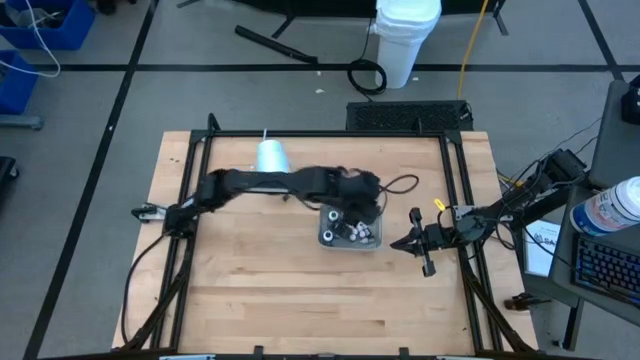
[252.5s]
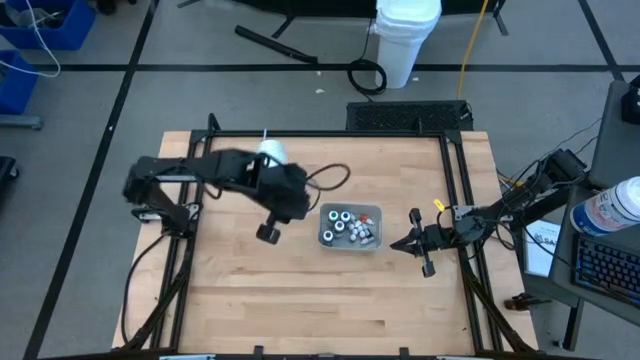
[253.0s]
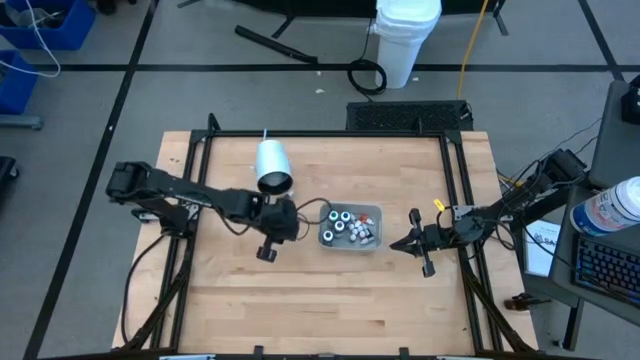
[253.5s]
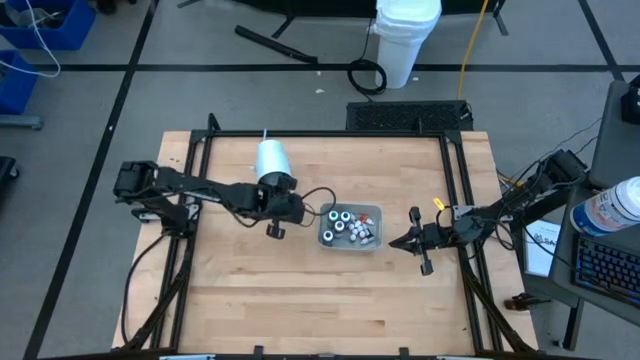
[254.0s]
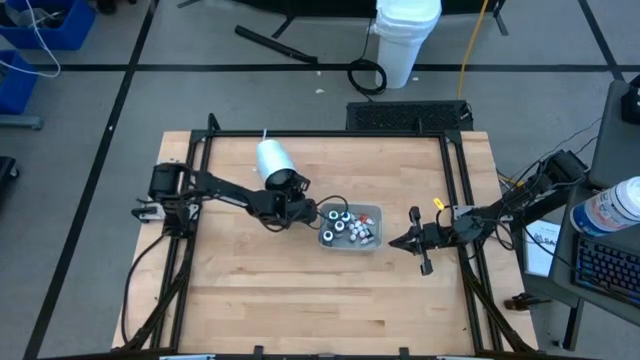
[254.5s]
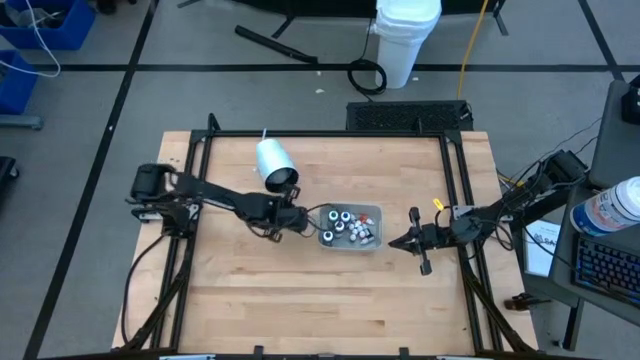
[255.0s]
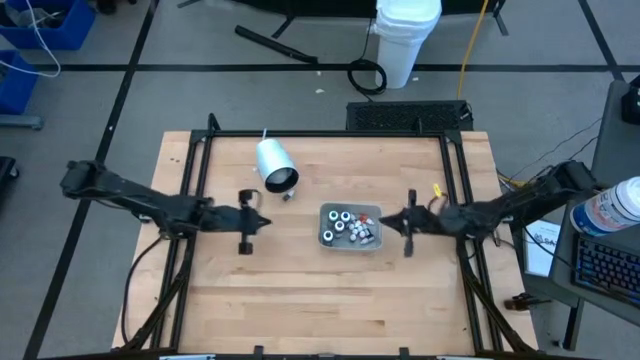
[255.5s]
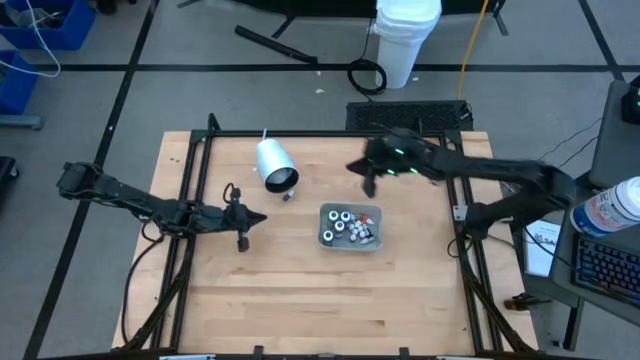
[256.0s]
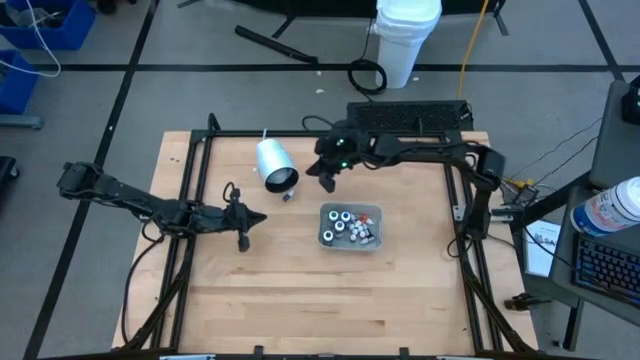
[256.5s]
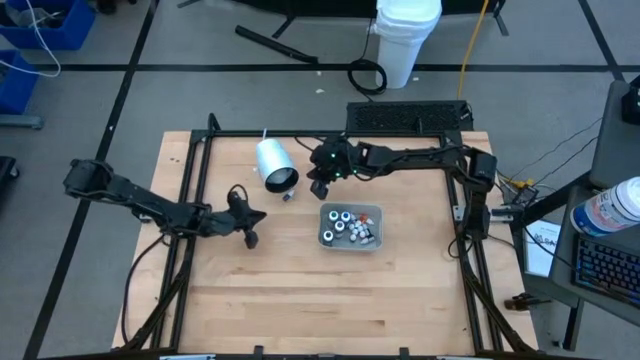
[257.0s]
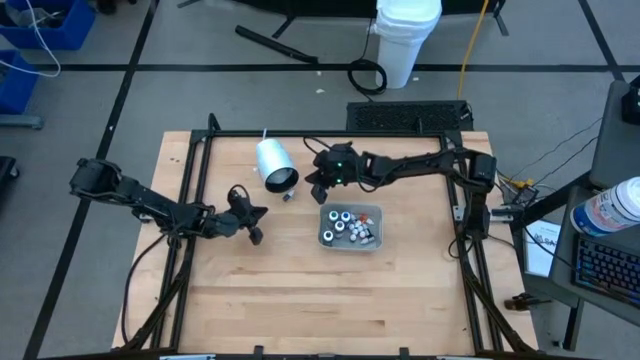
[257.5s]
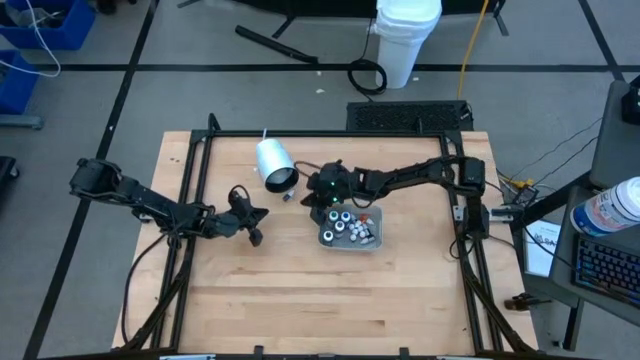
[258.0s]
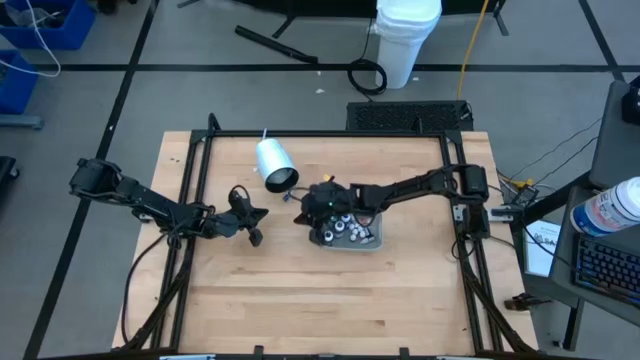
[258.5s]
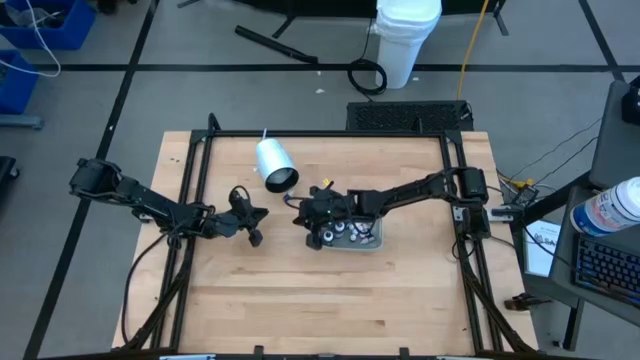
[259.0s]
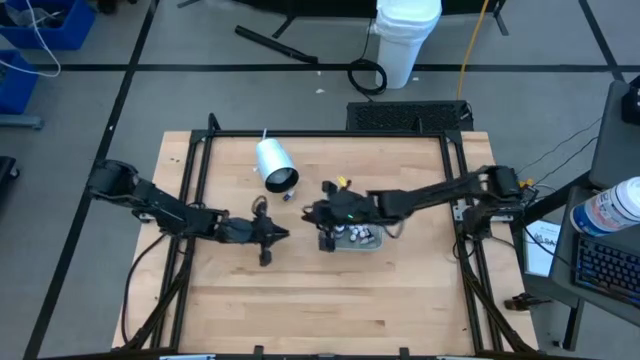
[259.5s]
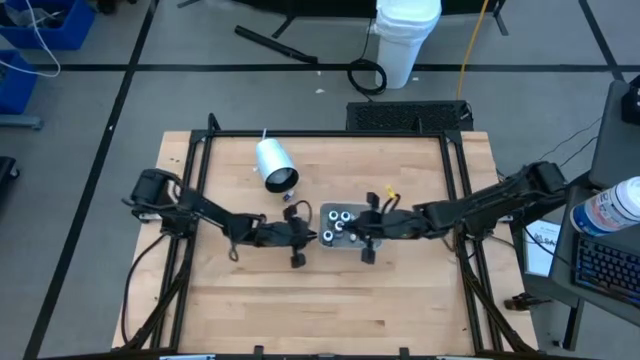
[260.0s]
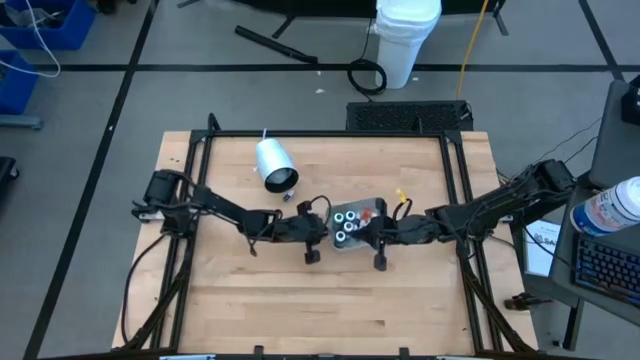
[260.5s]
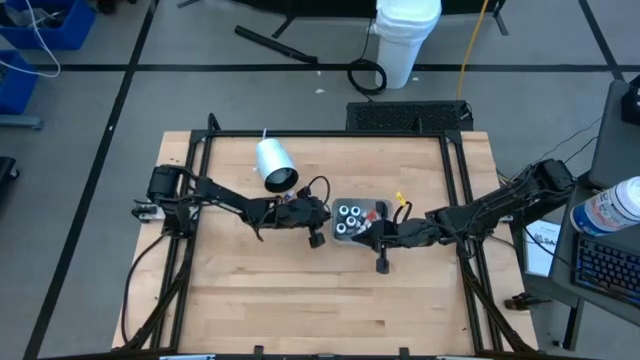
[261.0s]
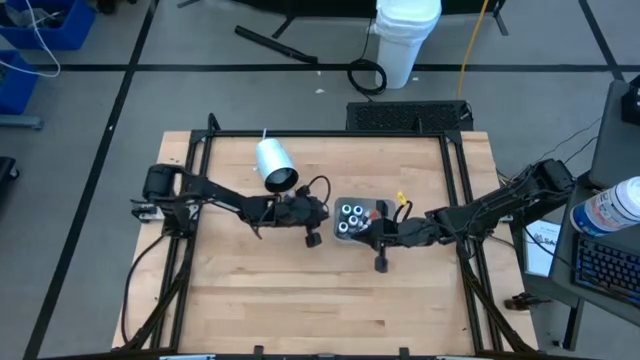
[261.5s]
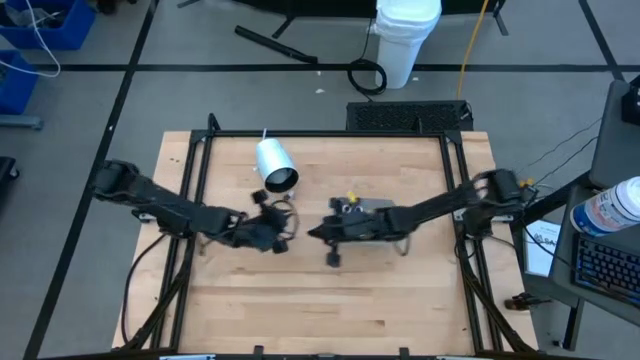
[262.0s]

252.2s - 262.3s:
Task: Pick & Place food coloring
Adjust the white bin

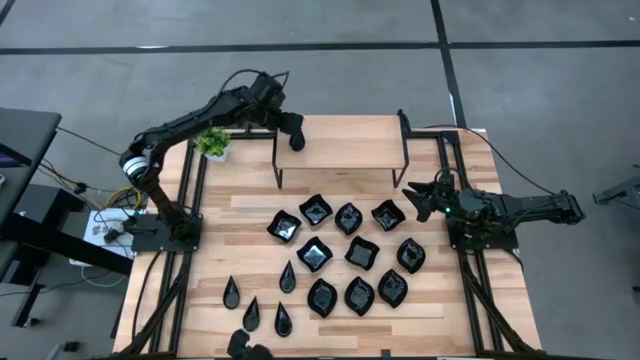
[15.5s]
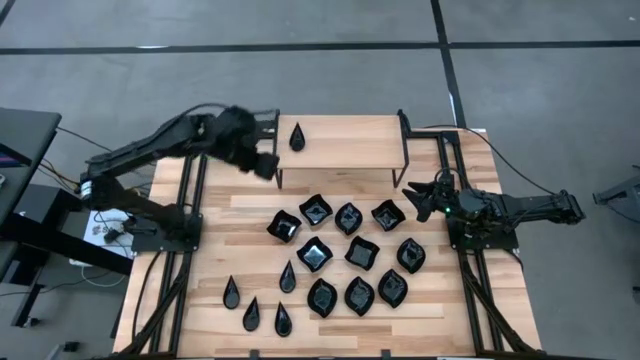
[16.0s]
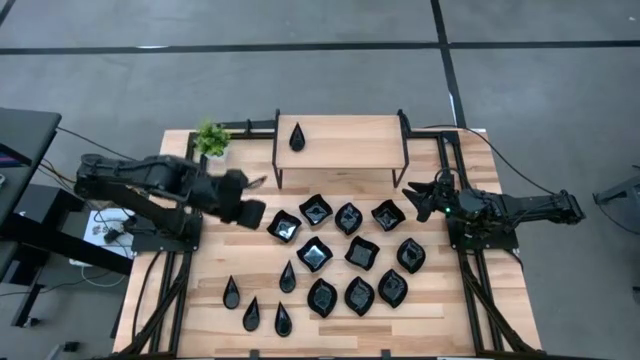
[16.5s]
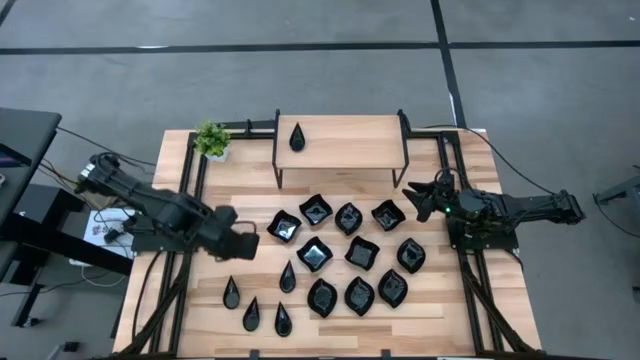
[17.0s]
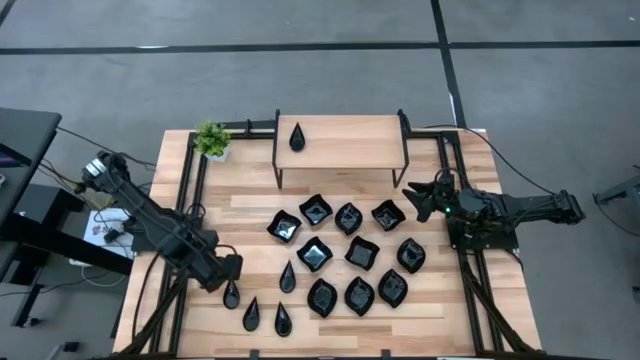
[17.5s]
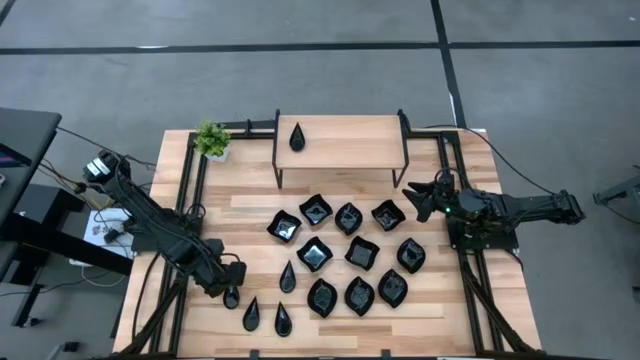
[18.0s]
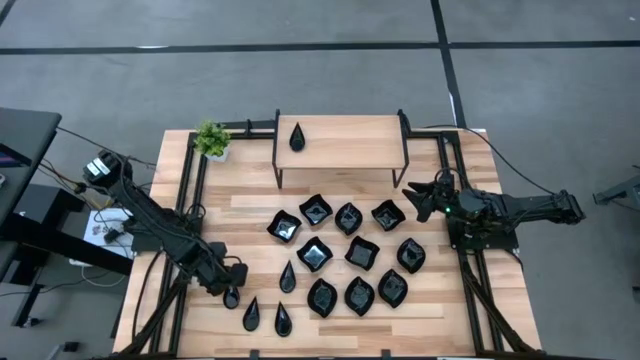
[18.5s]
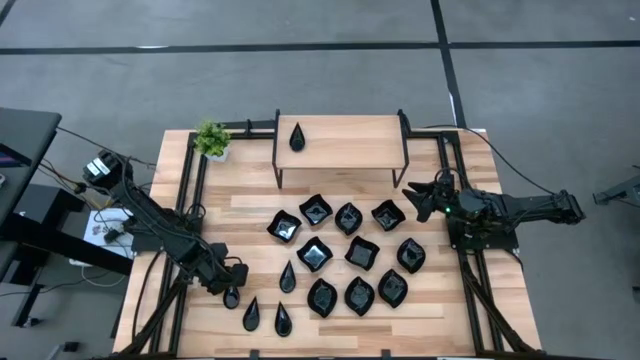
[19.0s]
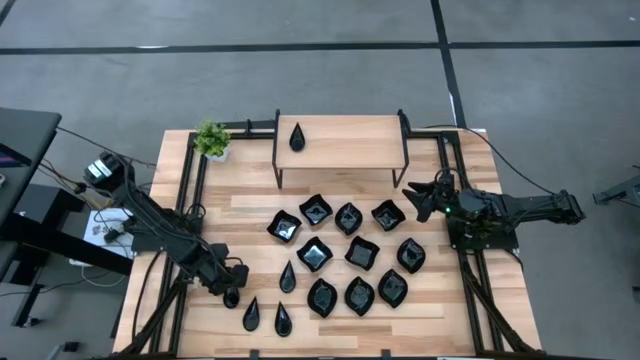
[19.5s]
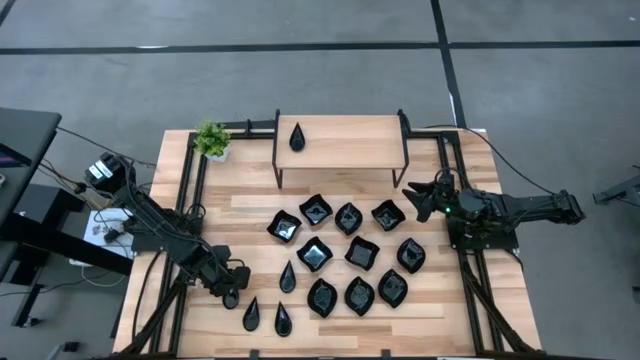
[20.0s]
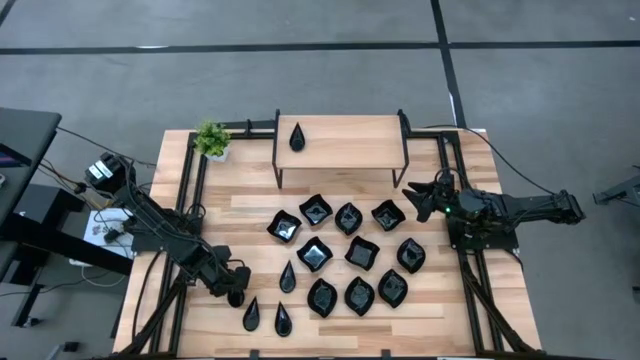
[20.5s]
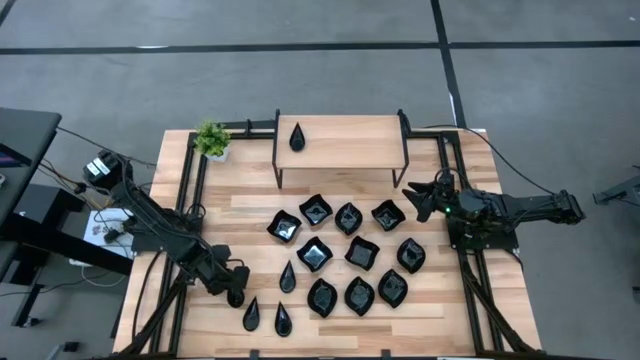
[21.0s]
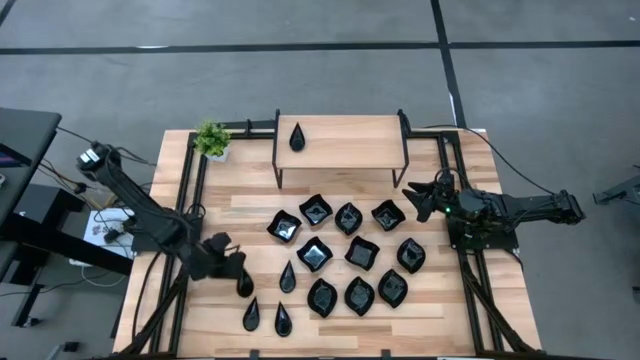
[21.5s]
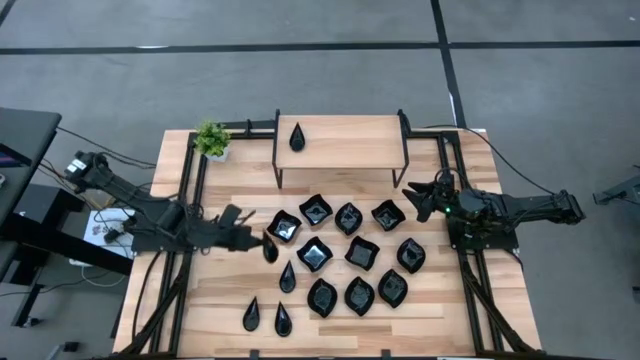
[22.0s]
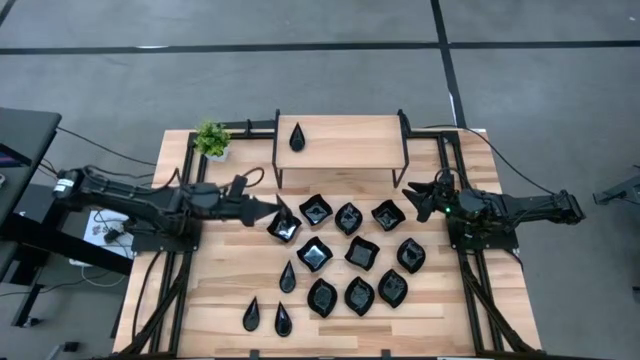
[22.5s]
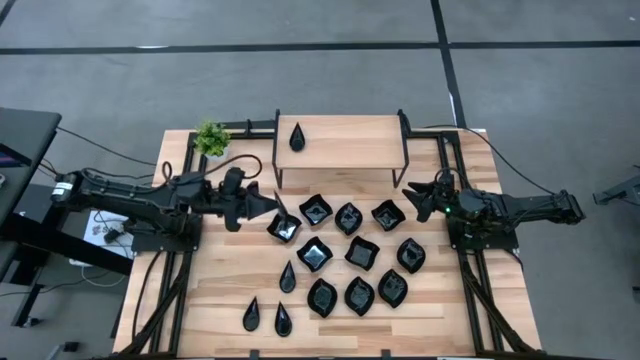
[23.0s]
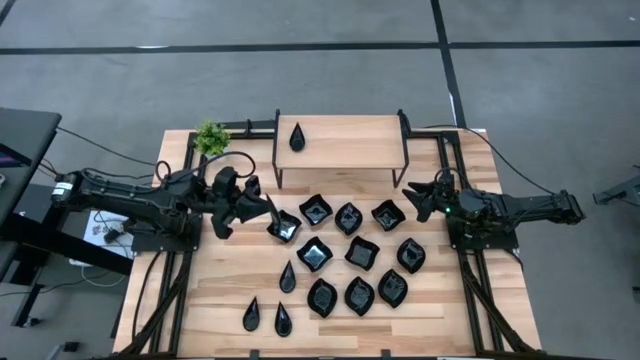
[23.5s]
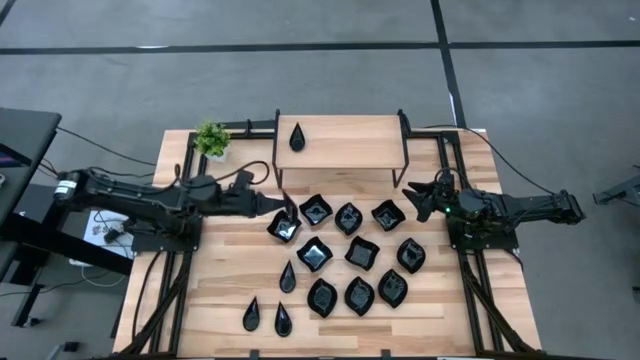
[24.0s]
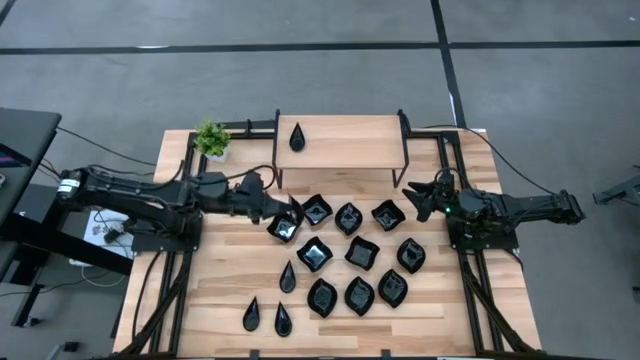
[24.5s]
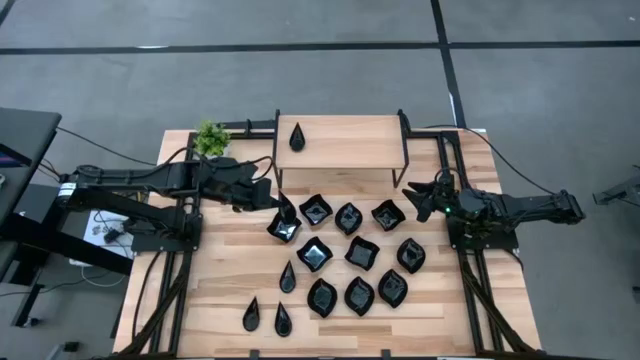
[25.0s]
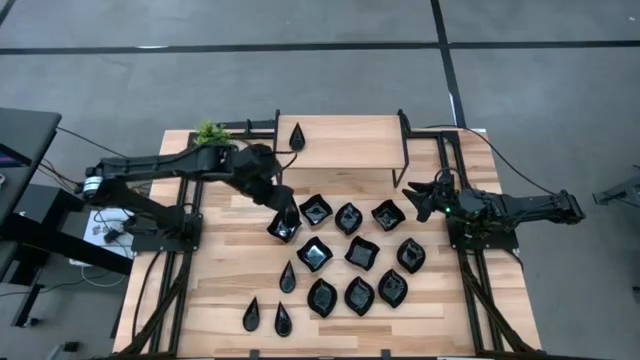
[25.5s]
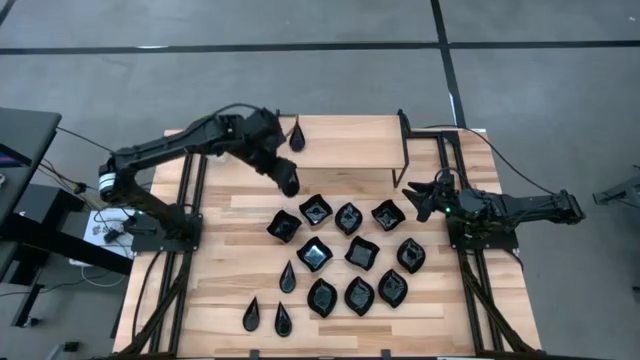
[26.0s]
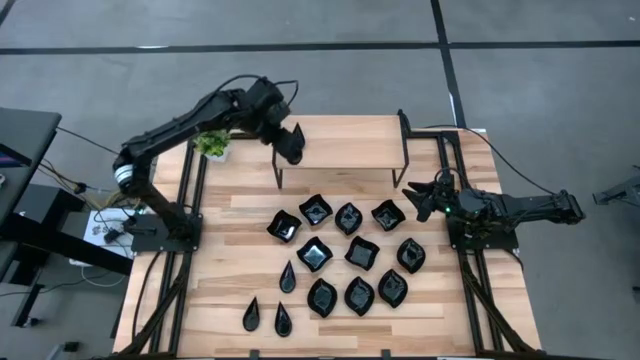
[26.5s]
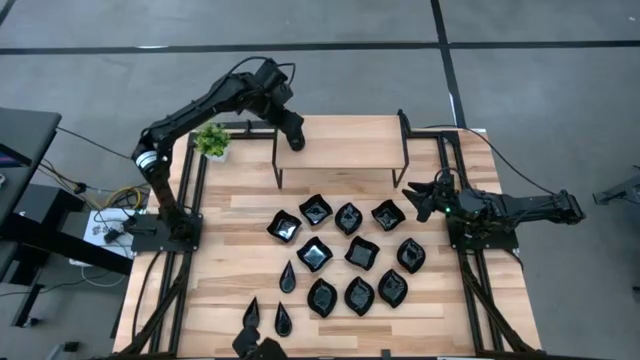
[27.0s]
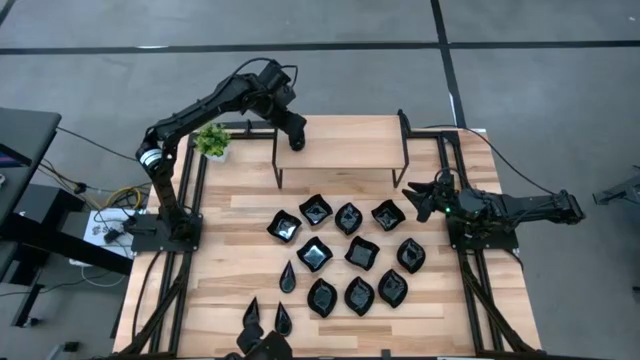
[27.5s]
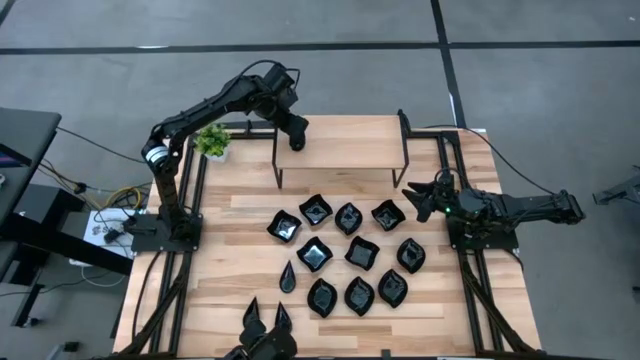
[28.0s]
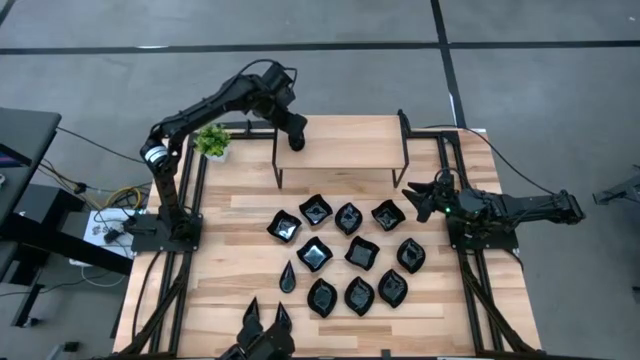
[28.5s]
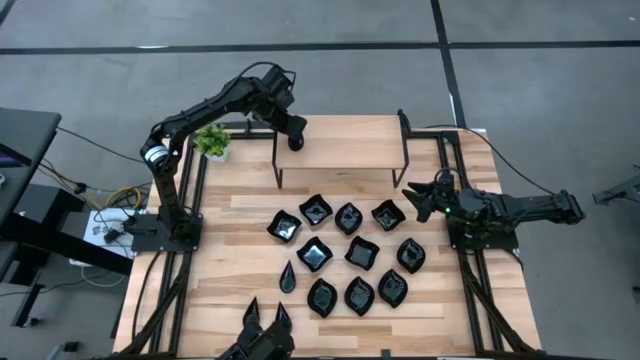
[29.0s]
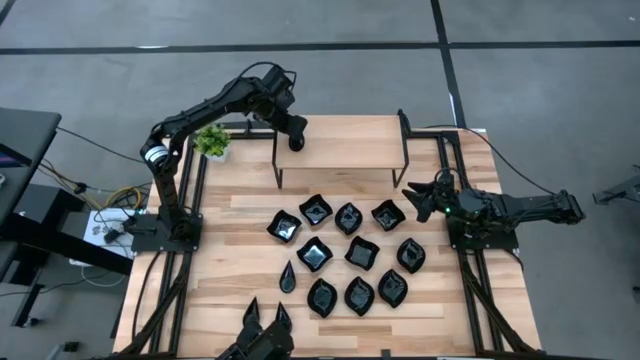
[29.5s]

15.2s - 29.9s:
Task: Pick & Place Mini shaped plates
Stack the drop shaped plate on top of the drop shaped plate on the shelf
